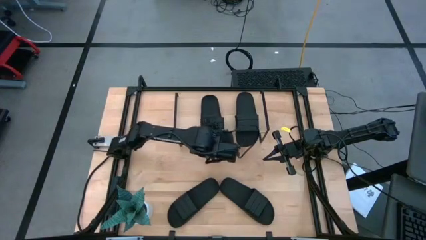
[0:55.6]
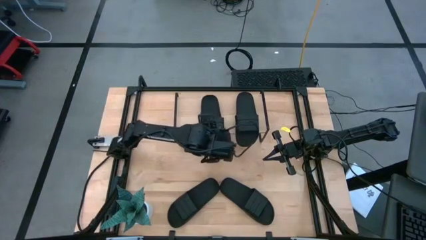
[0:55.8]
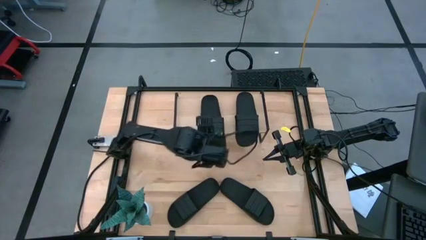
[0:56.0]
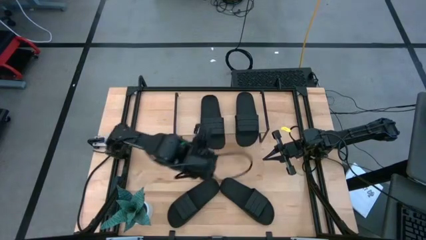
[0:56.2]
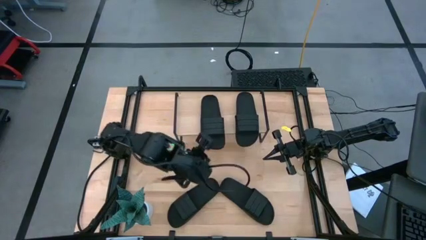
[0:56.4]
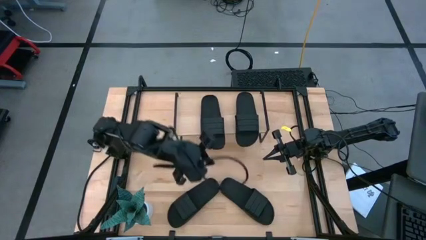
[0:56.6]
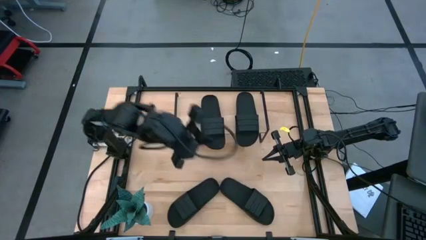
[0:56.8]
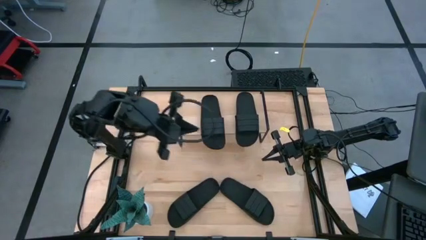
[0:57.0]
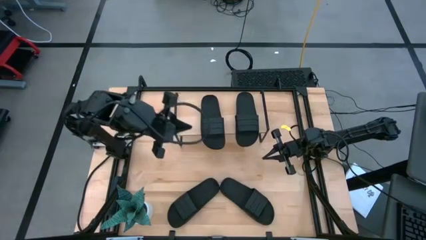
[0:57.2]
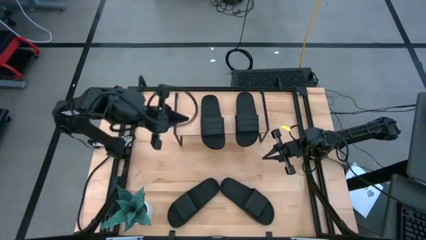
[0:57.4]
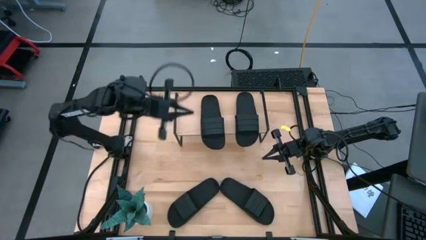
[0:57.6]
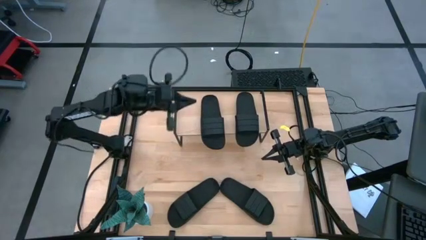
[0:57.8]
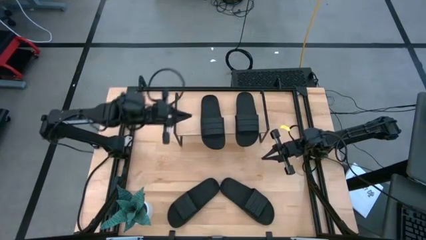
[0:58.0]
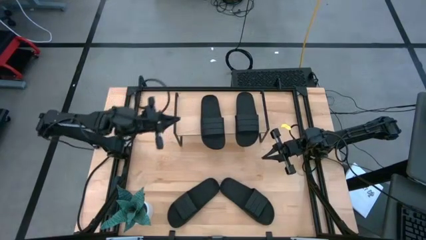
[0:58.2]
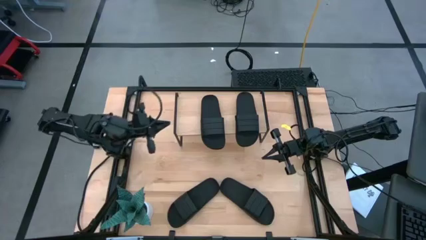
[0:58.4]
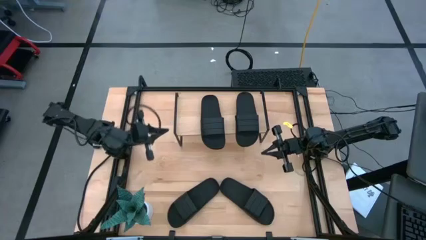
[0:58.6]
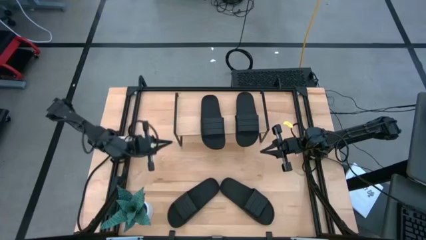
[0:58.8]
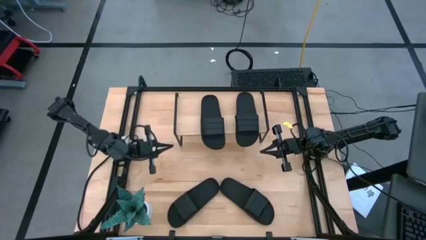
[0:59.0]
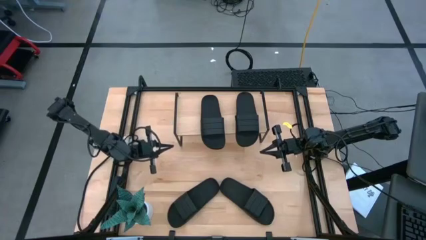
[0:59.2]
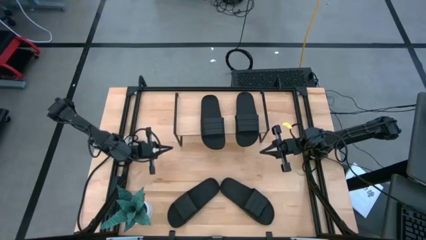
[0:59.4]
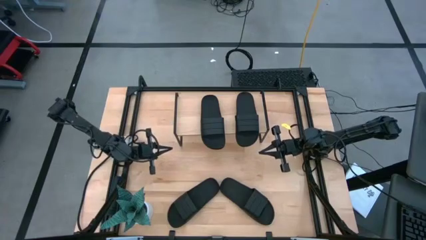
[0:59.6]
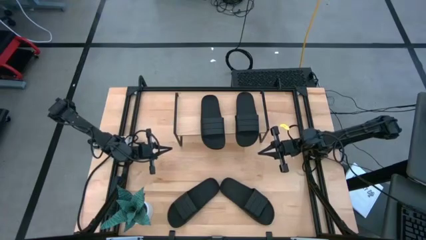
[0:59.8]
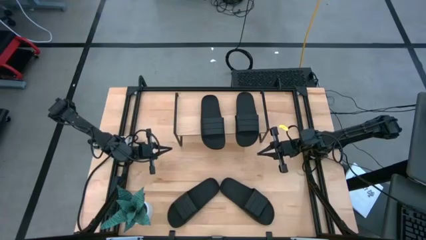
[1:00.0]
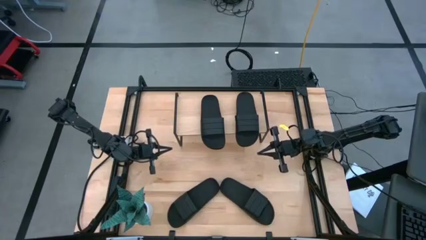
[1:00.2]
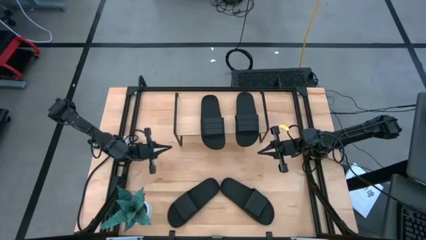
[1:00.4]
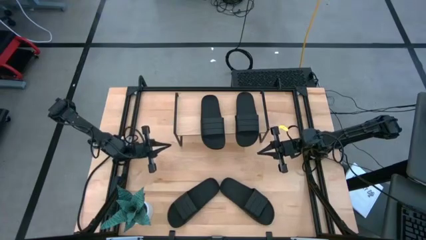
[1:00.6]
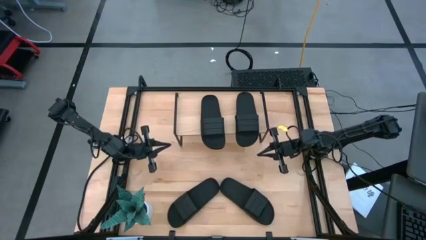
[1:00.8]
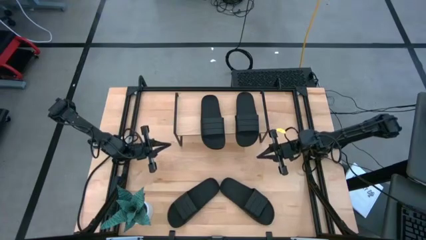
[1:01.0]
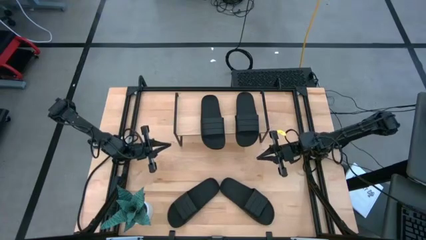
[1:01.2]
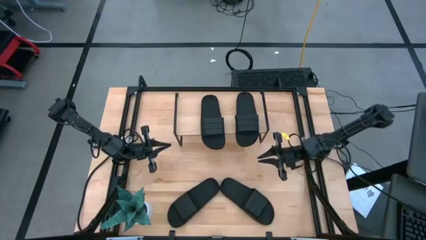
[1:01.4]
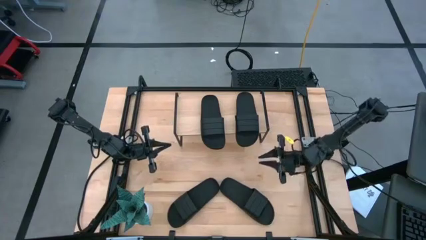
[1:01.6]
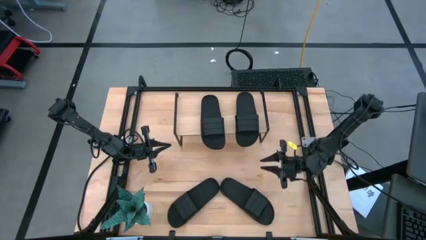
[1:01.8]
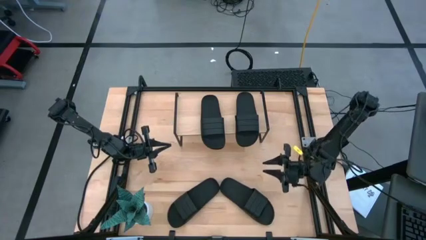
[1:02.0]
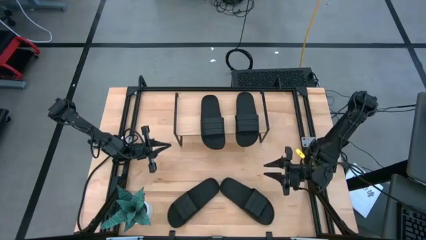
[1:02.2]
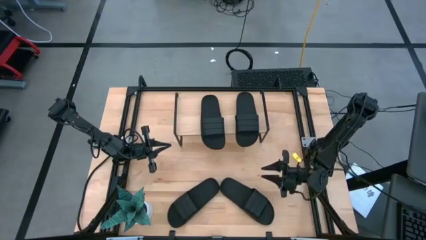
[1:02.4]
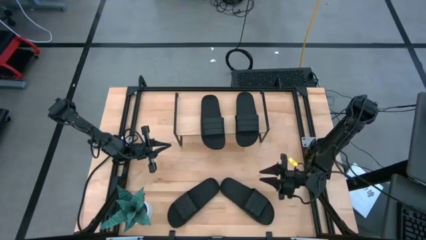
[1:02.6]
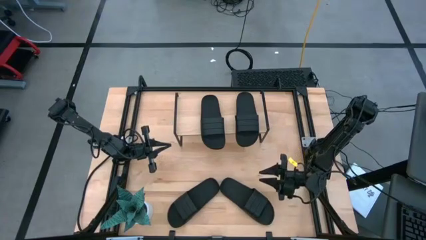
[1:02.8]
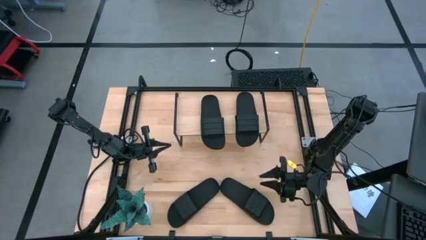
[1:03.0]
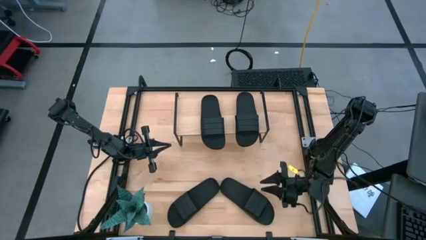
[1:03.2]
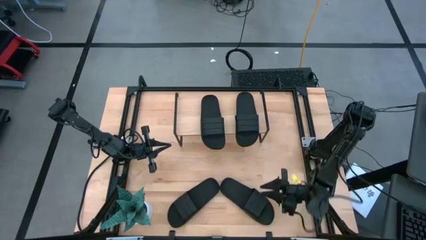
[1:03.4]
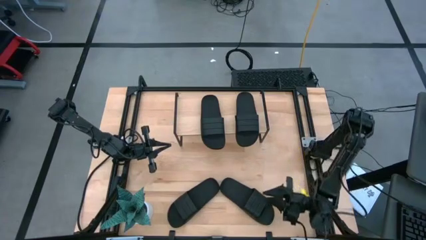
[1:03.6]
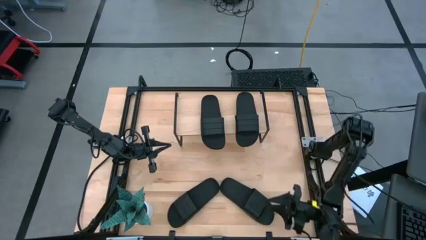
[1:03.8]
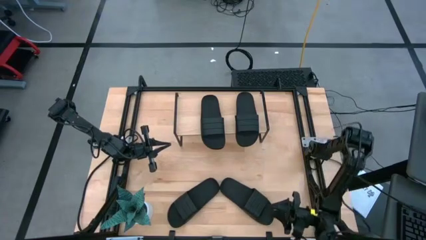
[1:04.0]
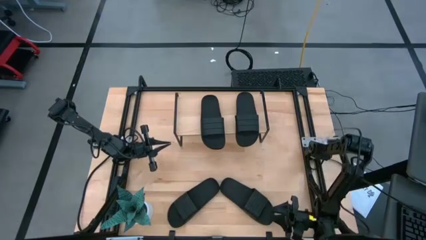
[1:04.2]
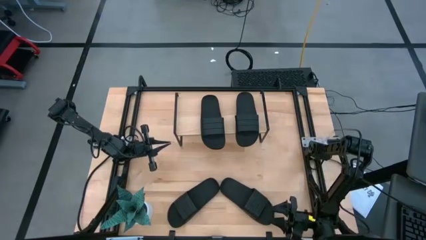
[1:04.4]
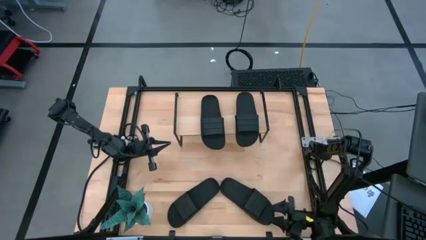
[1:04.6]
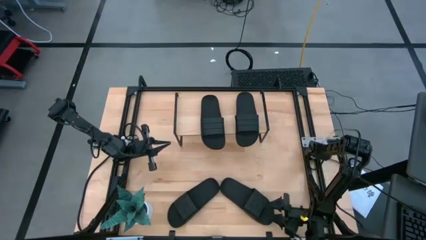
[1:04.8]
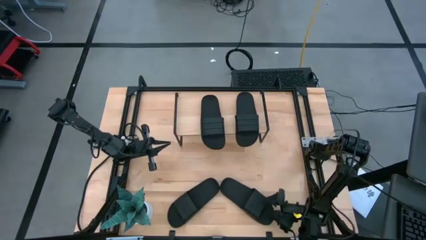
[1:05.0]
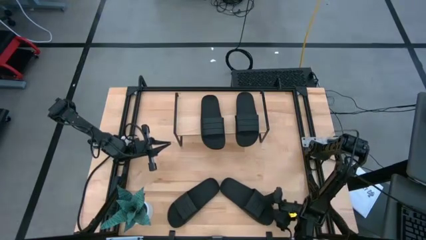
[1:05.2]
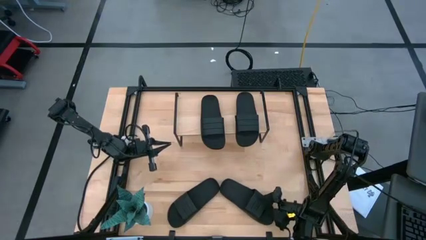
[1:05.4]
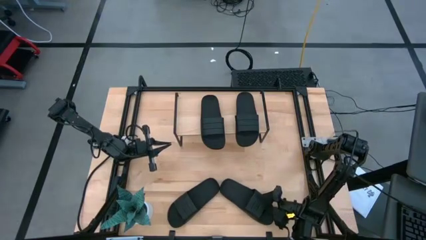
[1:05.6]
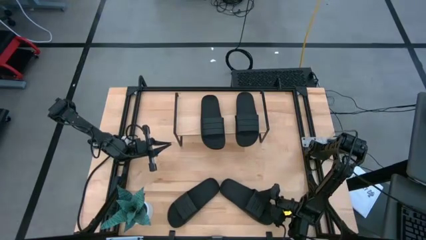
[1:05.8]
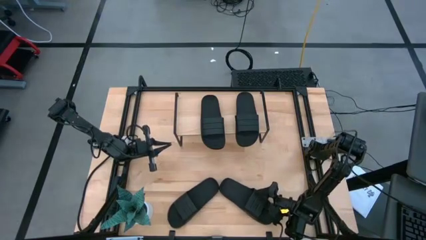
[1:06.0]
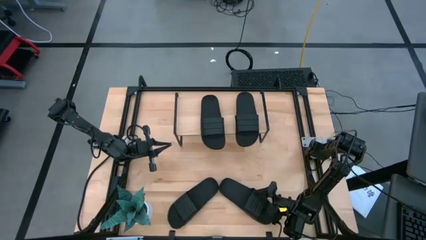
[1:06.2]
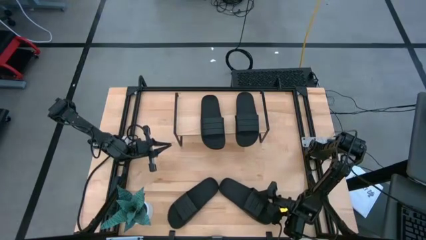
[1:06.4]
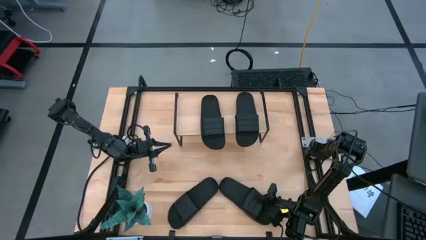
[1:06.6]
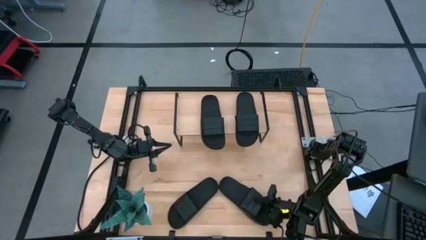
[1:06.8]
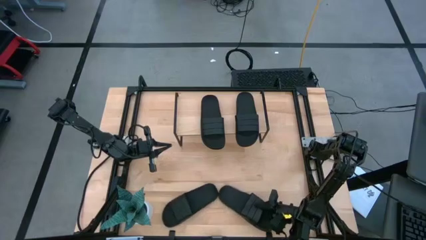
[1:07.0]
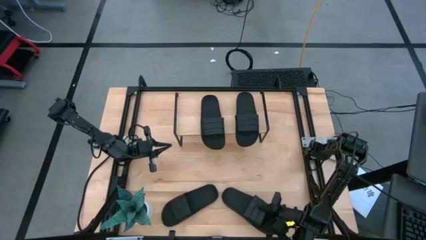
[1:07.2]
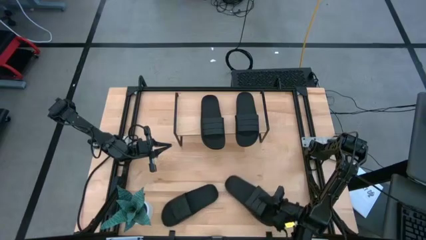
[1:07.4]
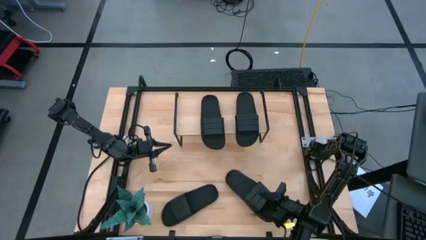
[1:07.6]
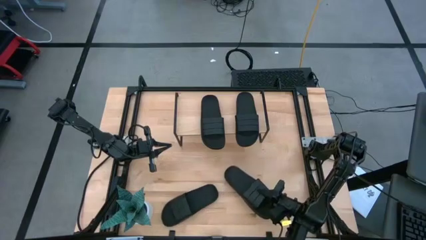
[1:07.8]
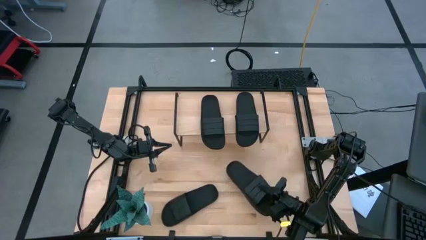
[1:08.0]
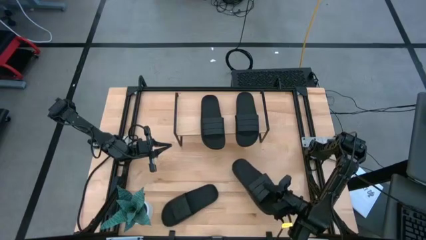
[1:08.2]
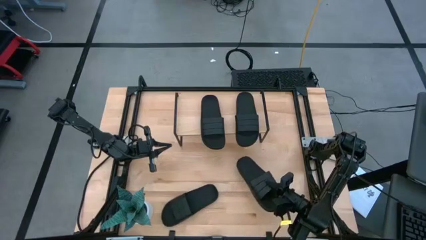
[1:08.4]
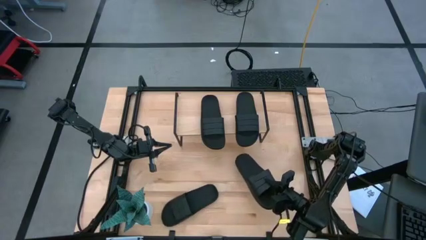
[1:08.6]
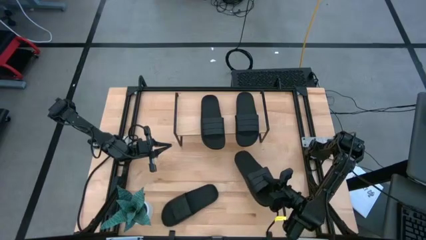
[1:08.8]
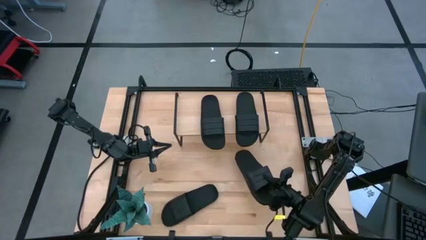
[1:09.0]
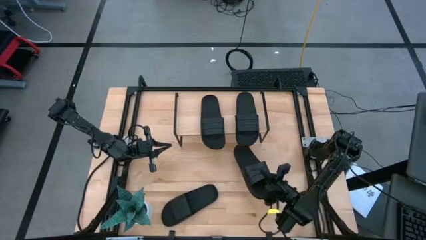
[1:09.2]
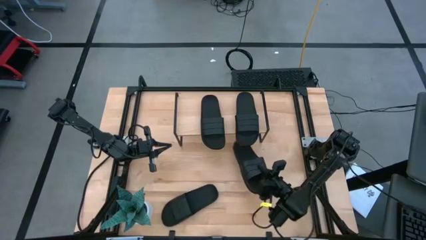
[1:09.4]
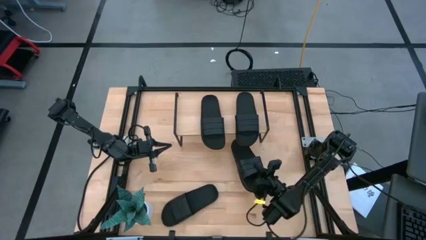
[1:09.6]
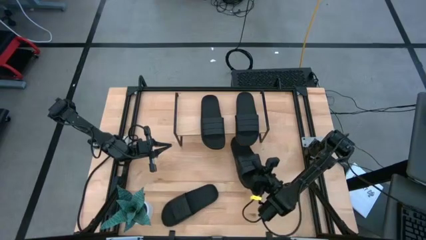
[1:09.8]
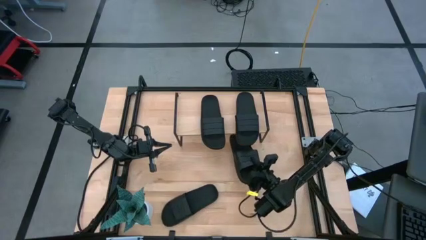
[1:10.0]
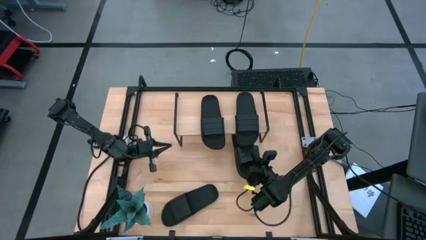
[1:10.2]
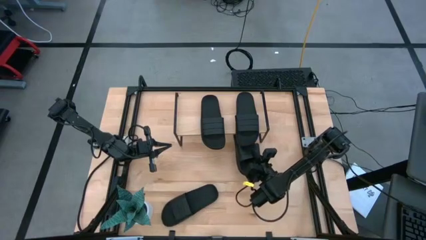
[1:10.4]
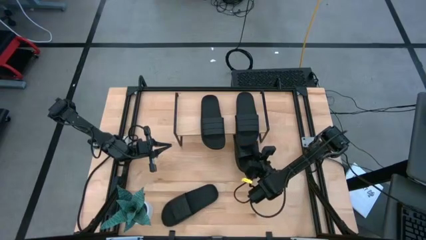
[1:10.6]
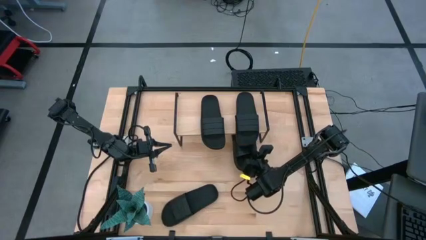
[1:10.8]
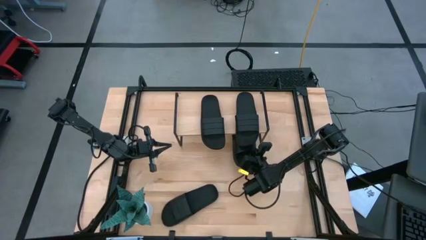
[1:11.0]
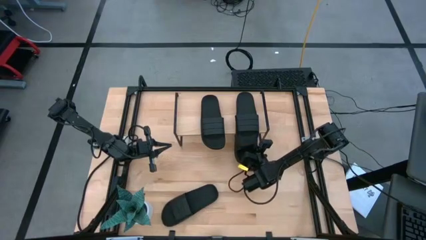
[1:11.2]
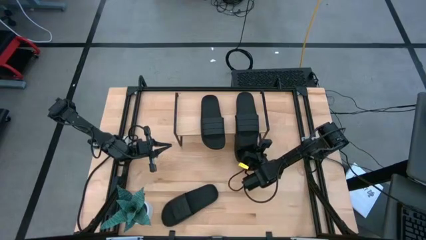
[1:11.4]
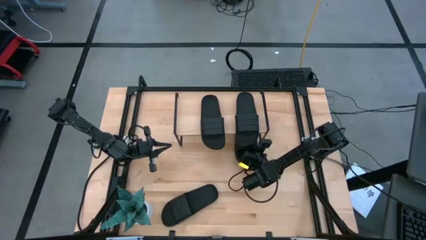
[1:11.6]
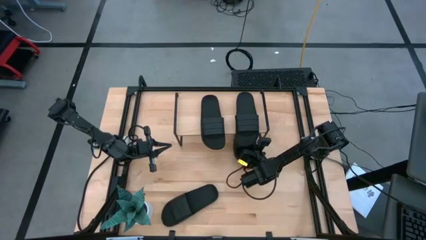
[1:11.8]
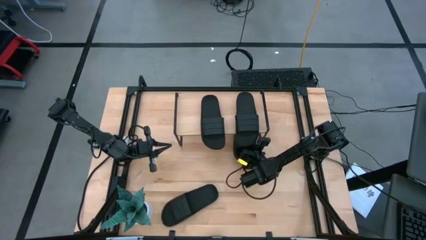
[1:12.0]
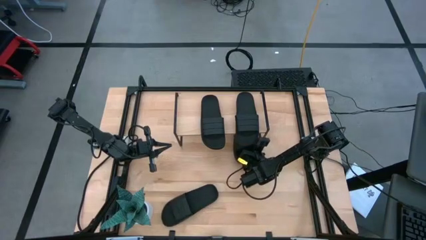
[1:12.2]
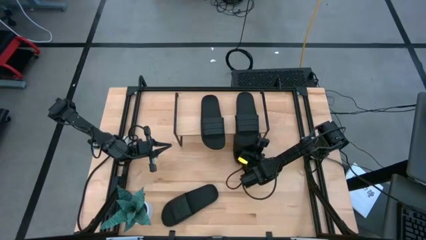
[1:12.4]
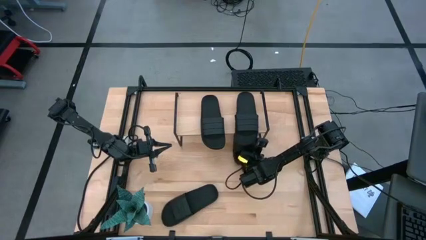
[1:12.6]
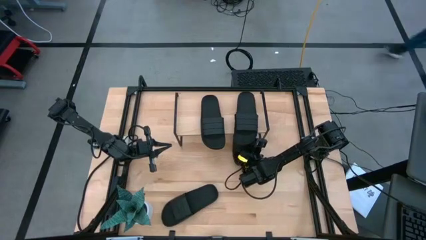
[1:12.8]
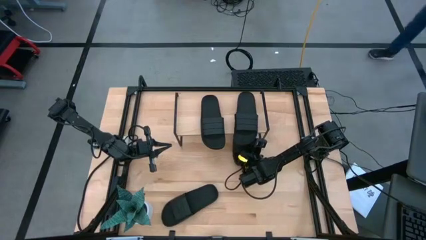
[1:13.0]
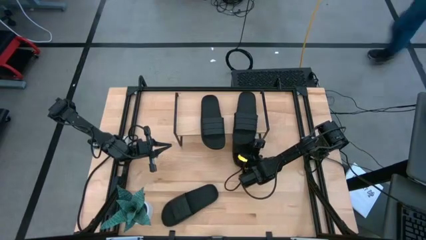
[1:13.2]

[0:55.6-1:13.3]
Task: Pick and place slides into the shelf
Put the right black slide under the shelf
